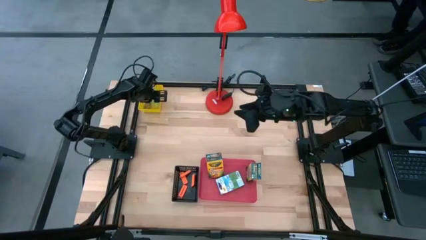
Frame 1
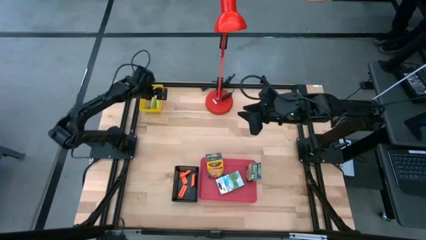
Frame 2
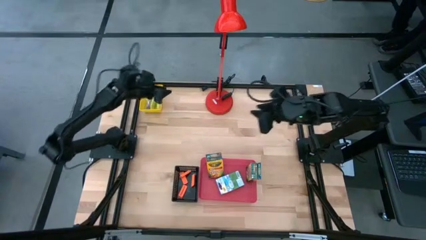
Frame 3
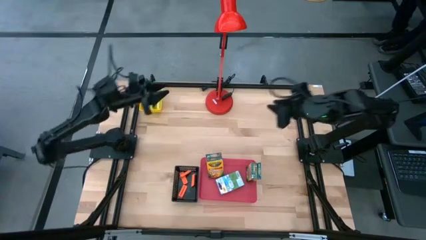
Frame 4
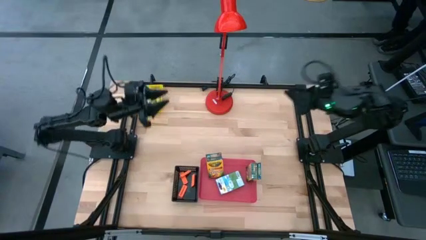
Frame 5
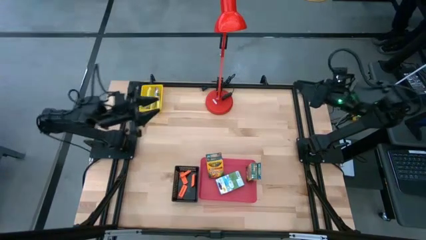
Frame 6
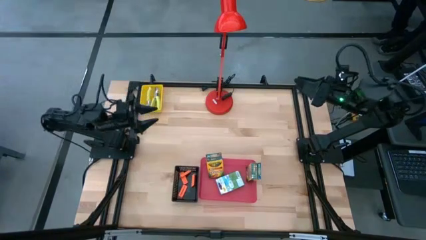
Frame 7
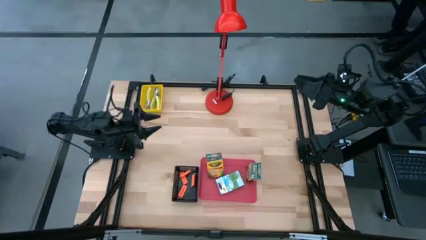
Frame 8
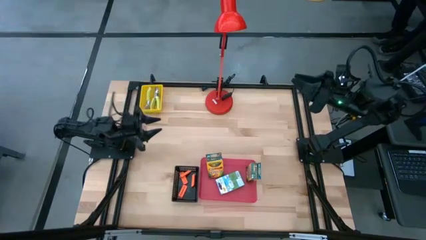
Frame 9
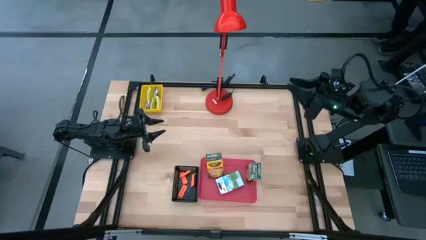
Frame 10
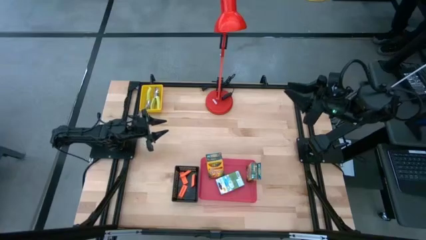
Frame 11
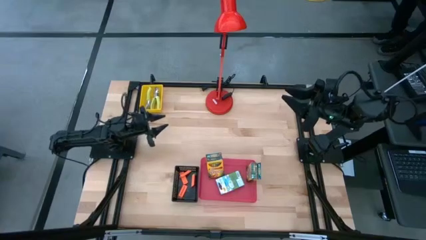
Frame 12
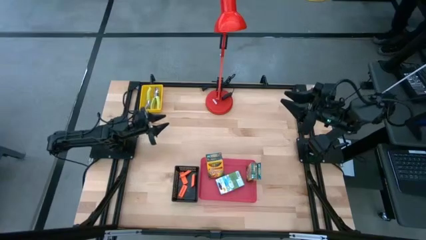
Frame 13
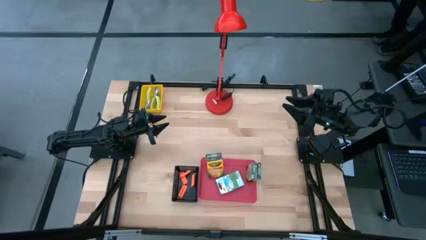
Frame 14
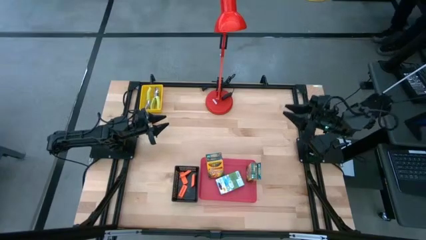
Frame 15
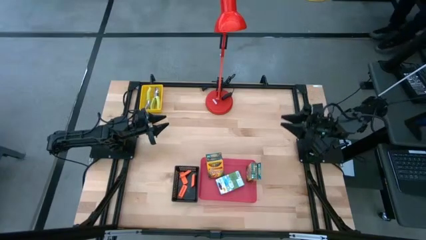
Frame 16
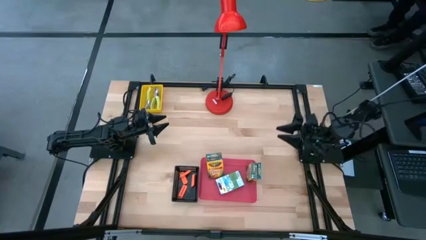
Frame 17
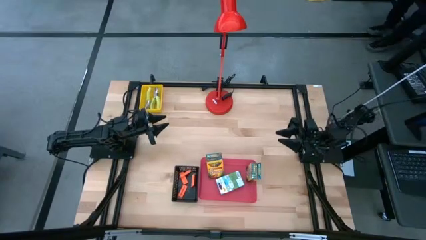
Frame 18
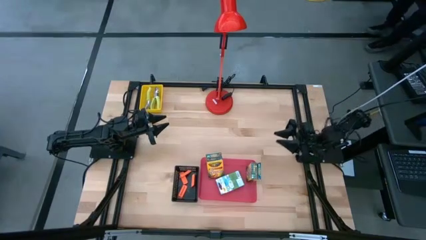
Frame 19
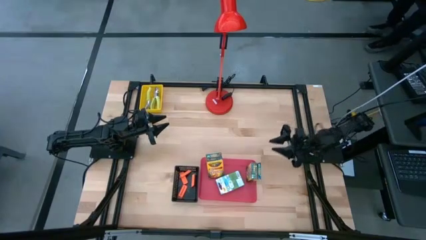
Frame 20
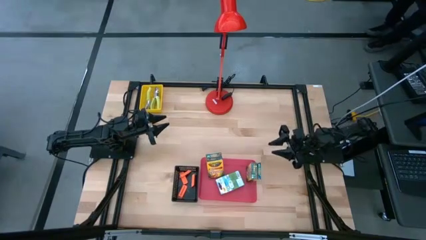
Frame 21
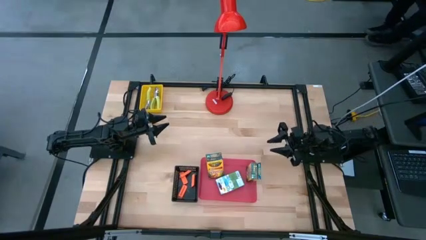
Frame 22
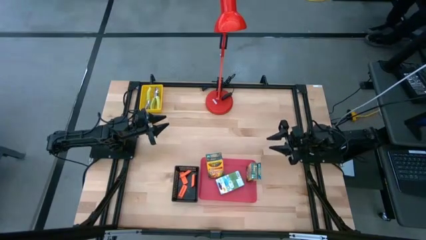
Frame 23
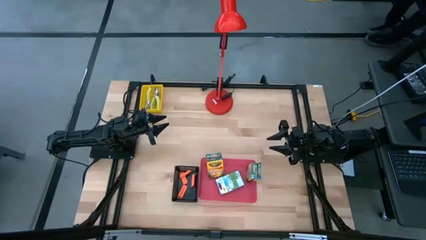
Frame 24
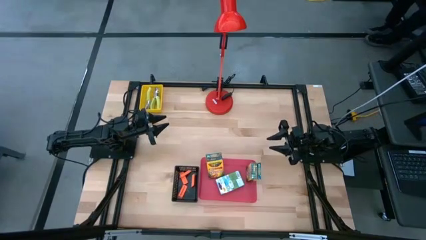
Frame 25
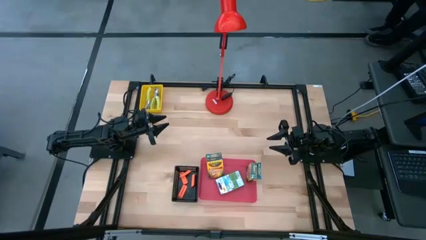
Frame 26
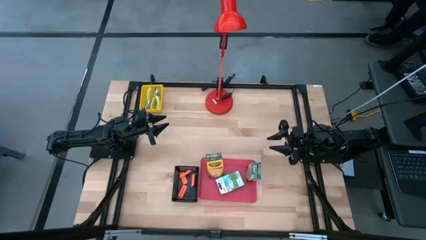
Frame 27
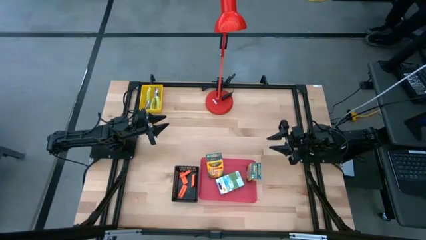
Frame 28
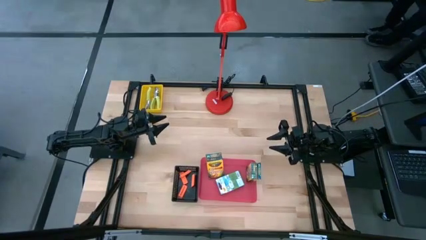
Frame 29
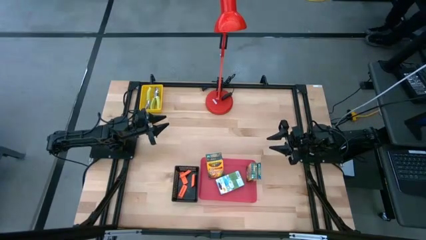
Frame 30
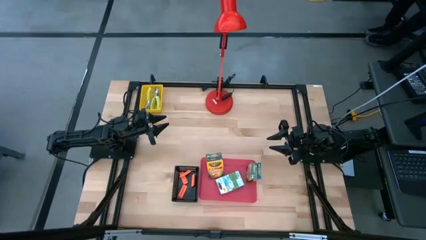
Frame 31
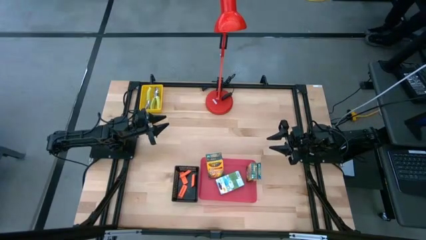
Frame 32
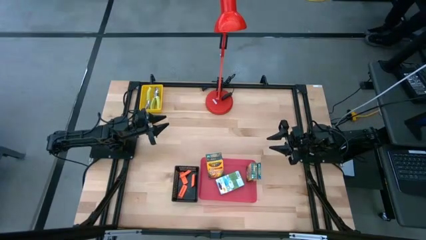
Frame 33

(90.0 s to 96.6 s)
Task: Pick & Place School Supplies
Return to Home Position

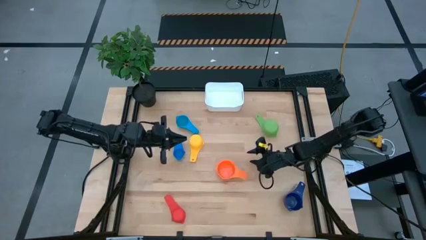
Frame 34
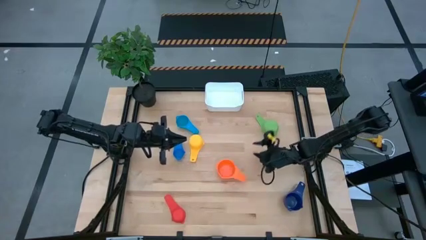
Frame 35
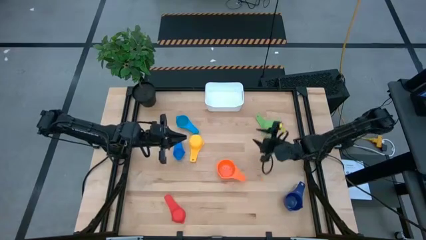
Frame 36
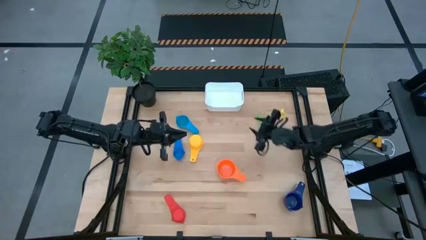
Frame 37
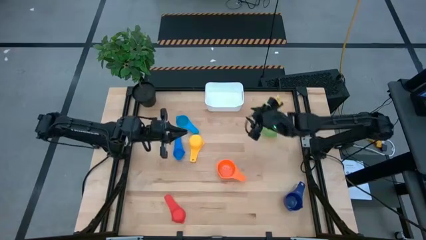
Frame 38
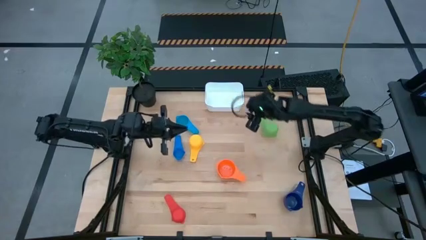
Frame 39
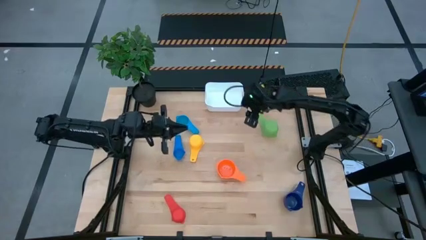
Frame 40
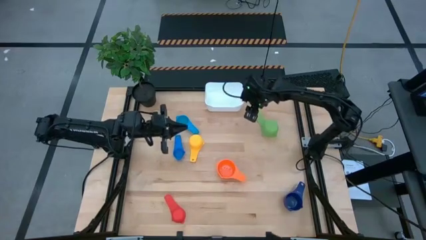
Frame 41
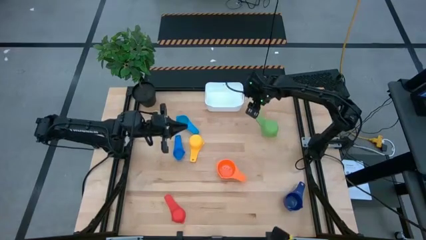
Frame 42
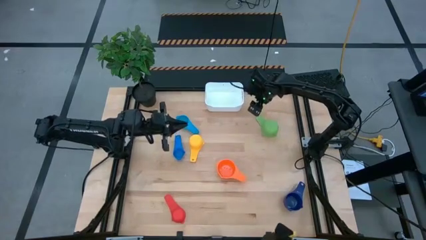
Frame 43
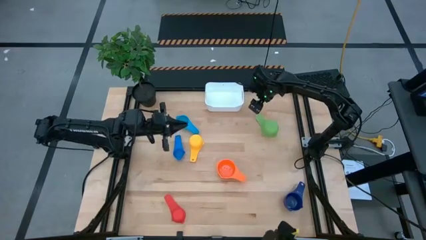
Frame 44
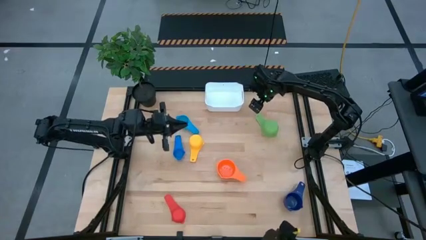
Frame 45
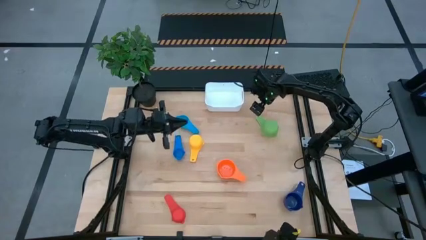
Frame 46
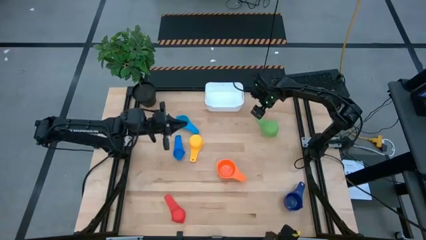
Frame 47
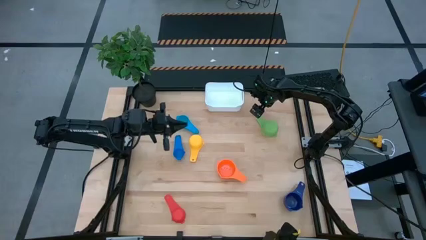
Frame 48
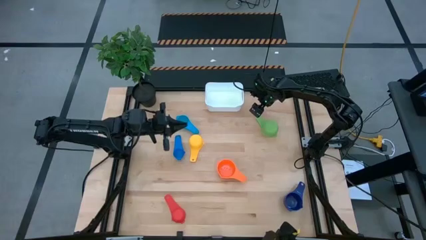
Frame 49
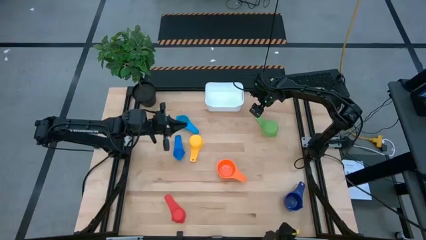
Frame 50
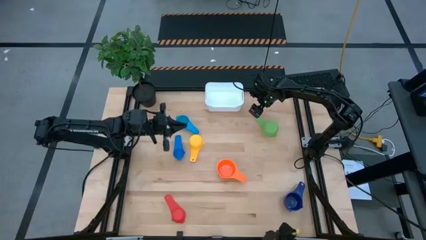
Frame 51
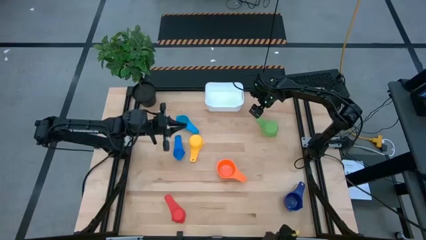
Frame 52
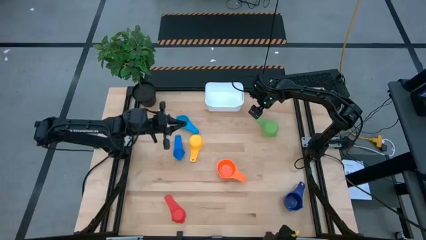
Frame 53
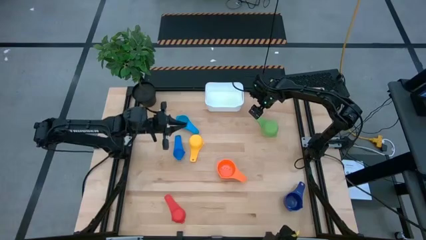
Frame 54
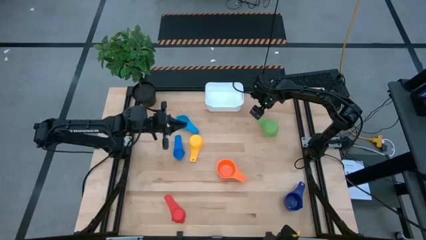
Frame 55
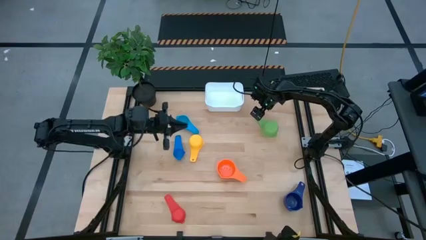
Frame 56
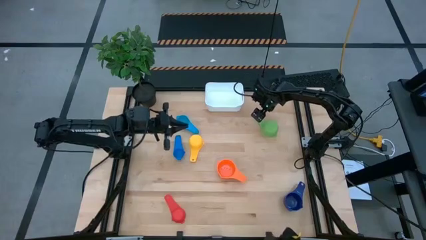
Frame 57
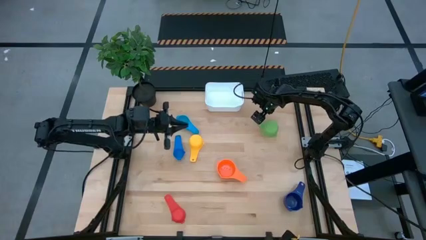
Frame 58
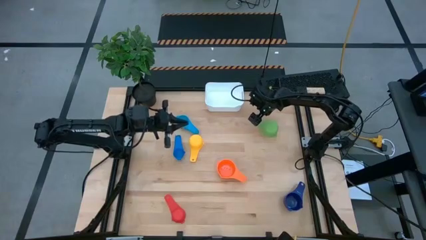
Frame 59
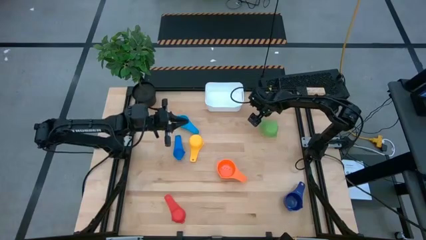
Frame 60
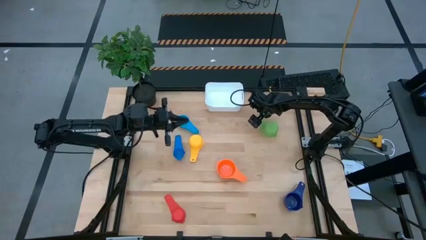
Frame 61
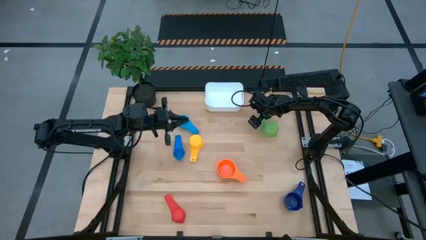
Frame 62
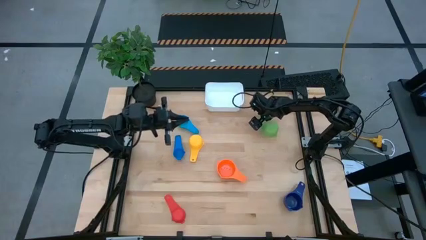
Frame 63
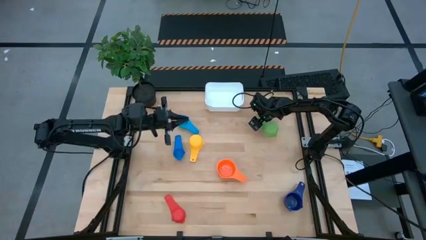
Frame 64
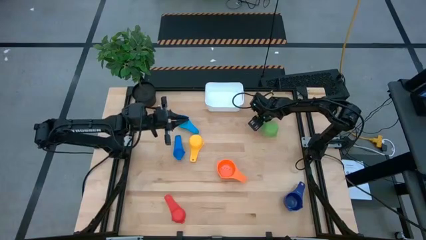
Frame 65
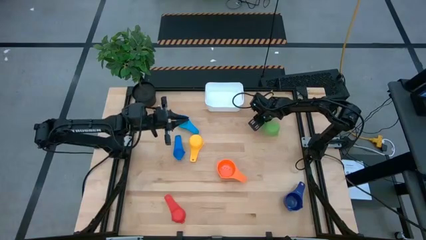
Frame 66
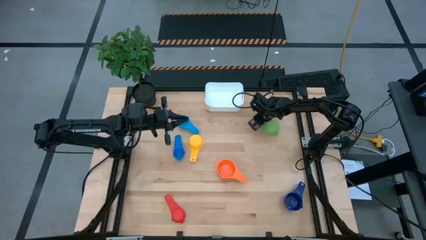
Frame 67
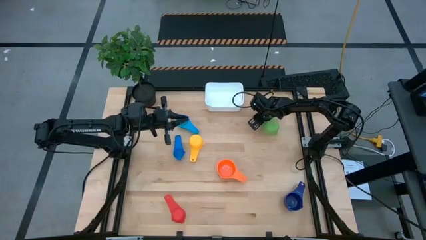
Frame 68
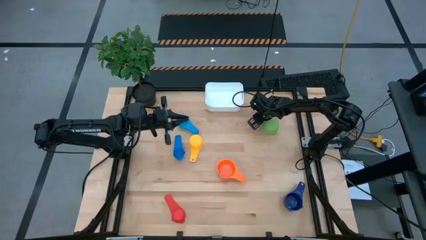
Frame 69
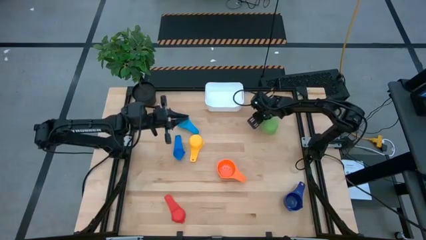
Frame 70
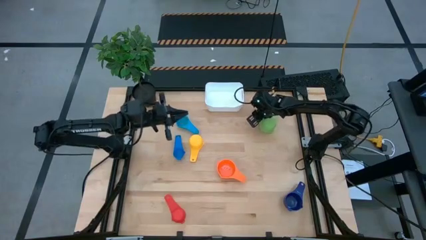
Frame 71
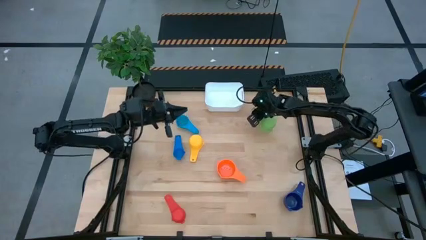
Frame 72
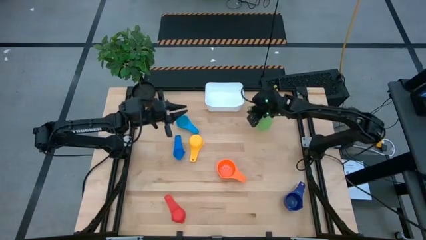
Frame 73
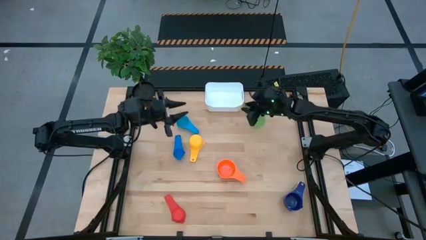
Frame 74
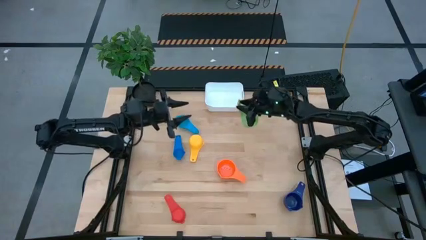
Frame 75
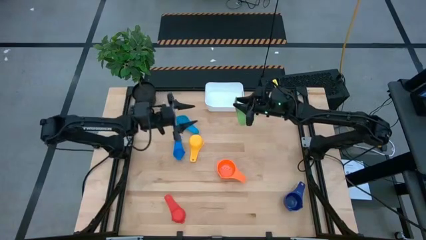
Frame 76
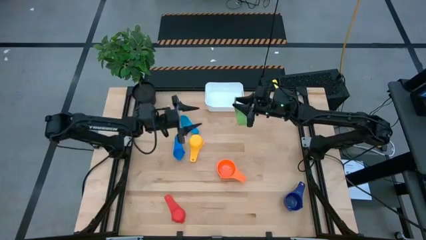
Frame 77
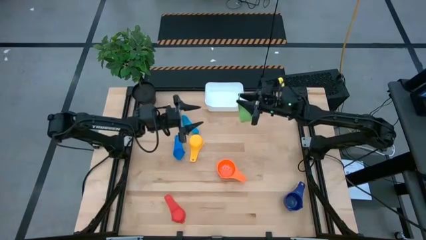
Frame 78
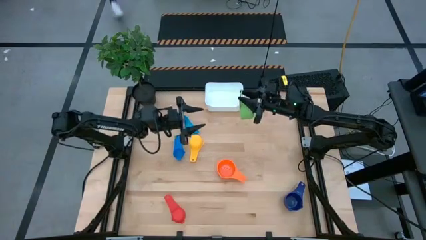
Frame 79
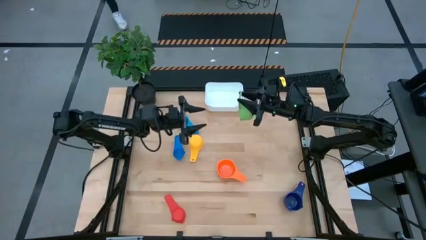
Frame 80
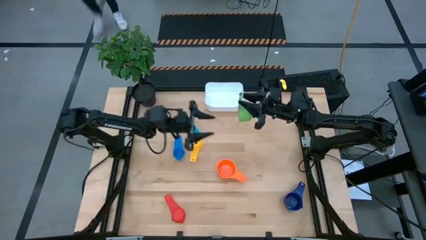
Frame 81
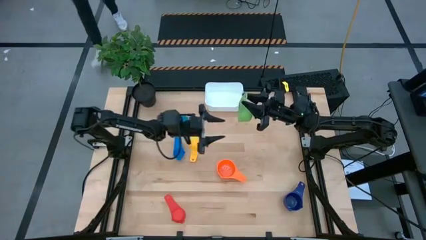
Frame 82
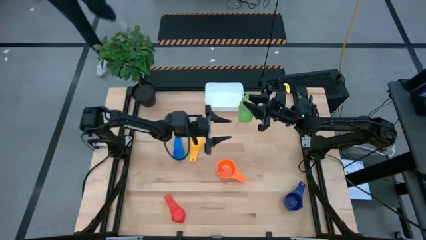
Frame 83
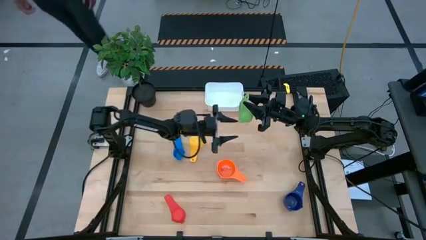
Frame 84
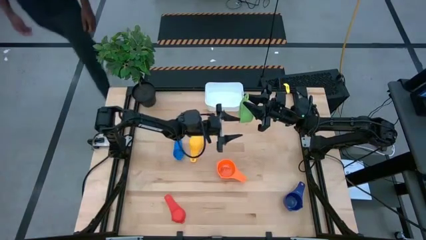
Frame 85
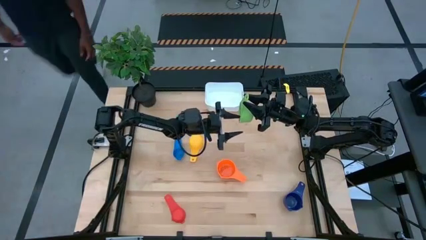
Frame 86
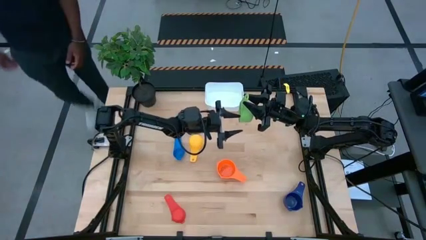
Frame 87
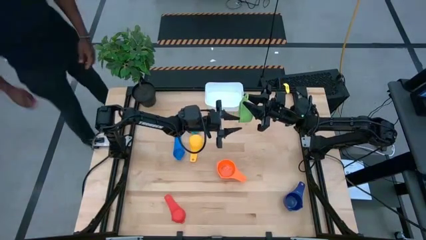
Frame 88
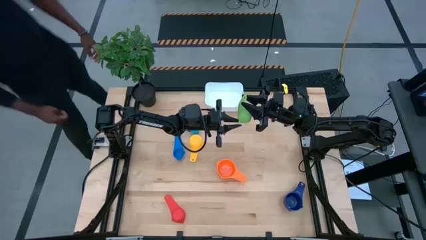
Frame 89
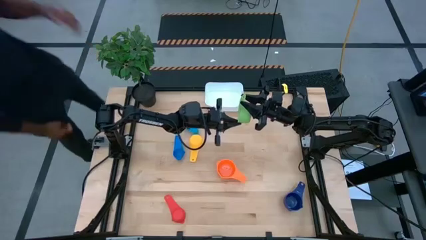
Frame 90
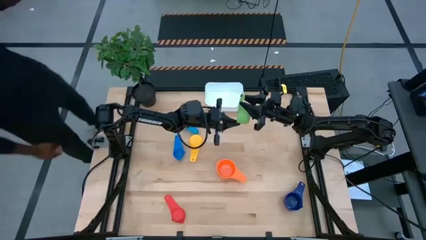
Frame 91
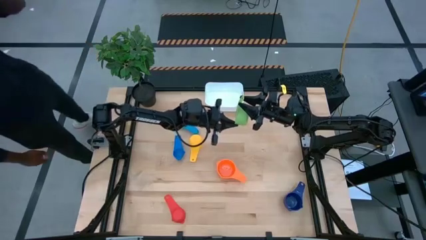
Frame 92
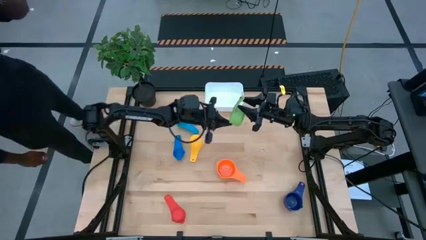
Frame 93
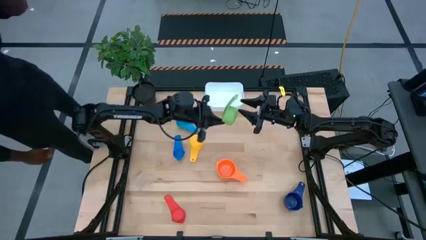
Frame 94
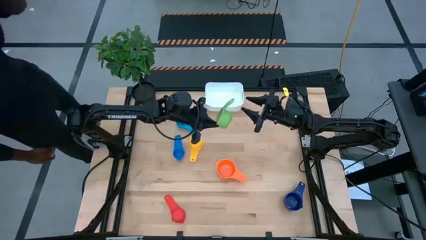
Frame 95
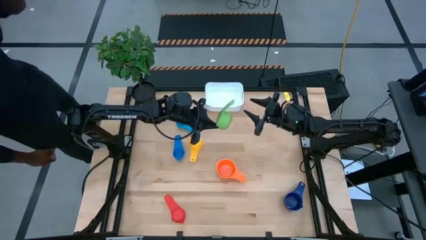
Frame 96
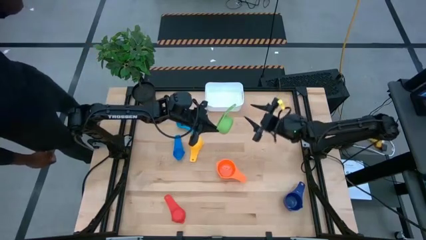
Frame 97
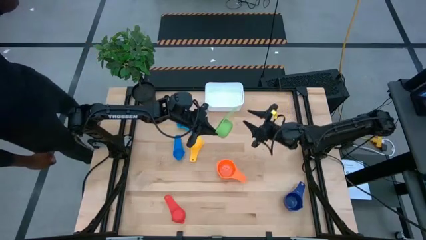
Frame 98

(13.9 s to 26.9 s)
Task: Nest measuring cups in basket
Stack the green measuring cup on top of the orange measuring cup
